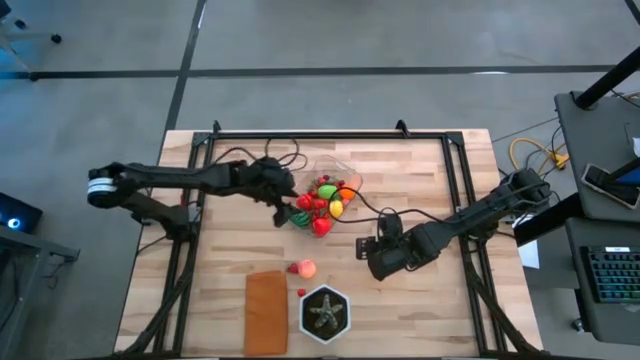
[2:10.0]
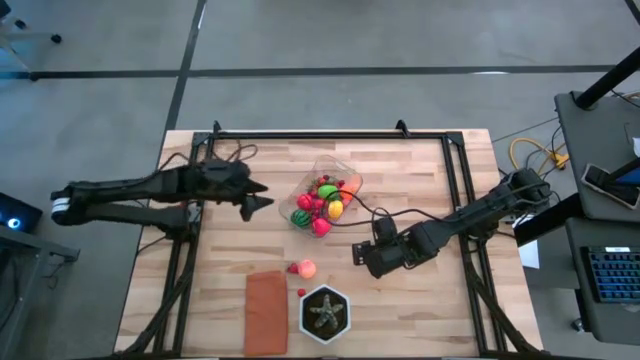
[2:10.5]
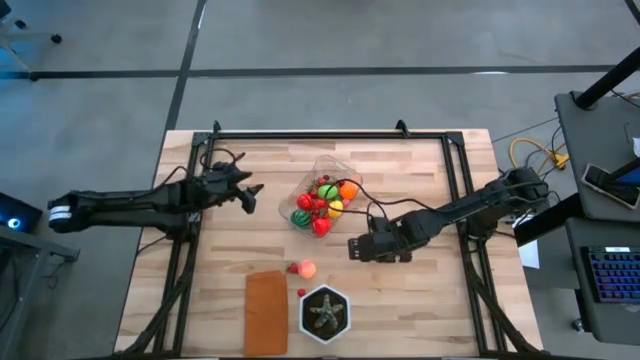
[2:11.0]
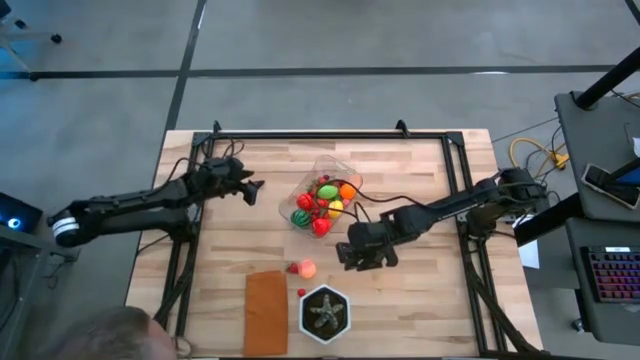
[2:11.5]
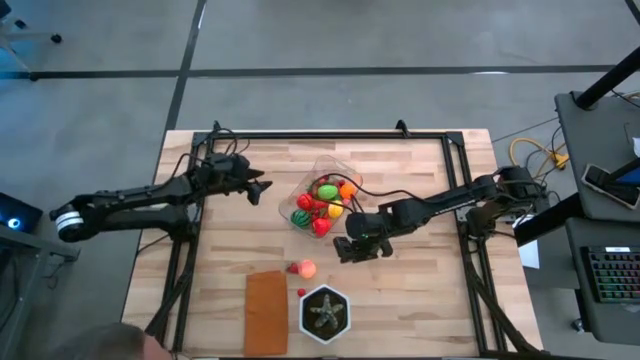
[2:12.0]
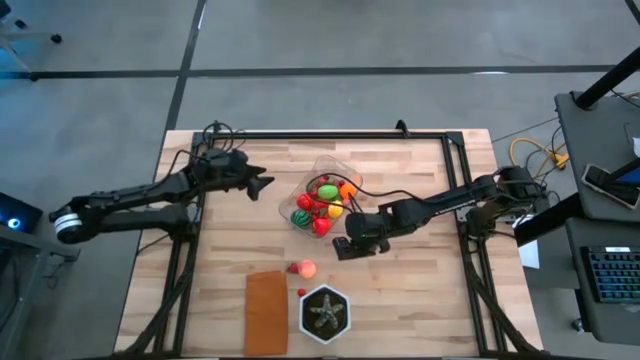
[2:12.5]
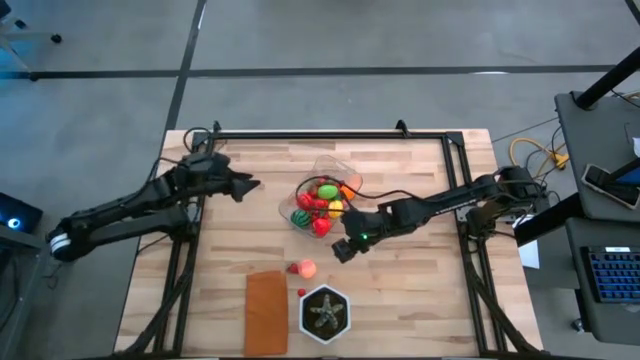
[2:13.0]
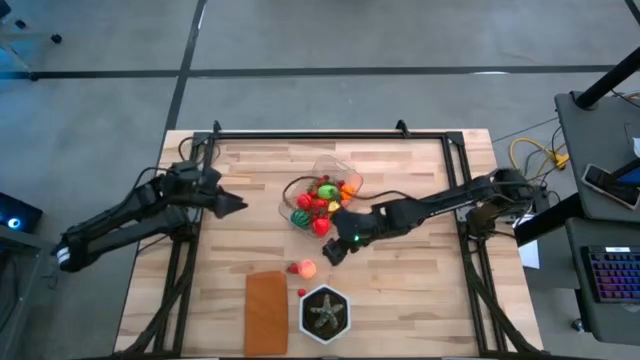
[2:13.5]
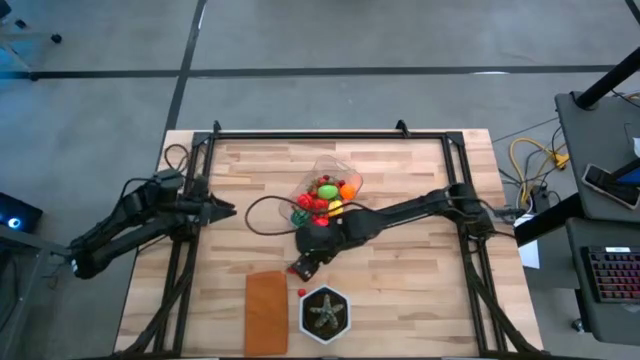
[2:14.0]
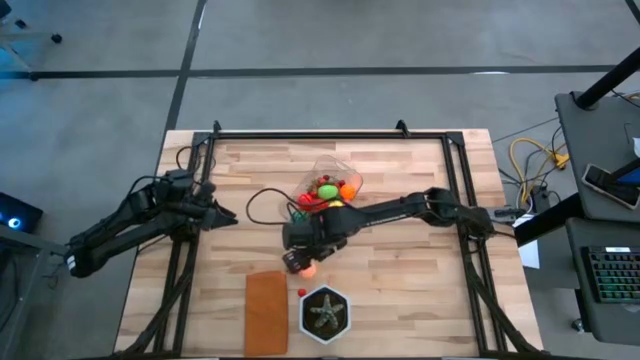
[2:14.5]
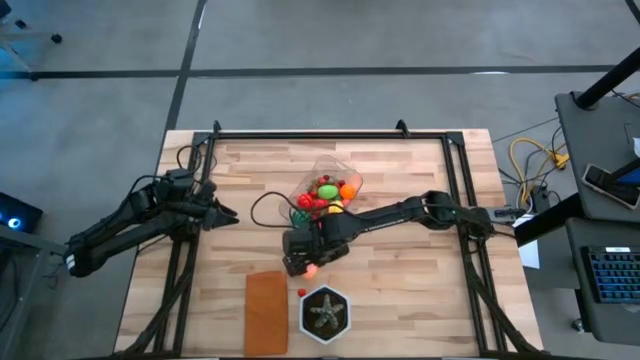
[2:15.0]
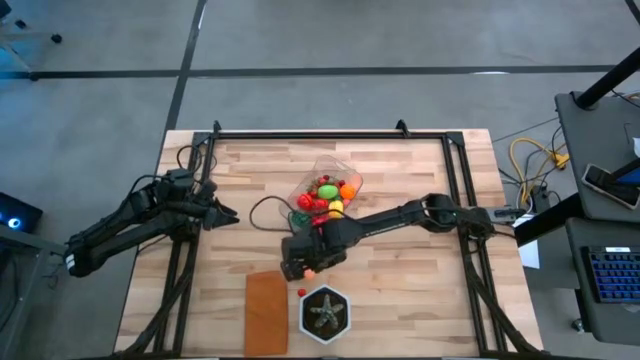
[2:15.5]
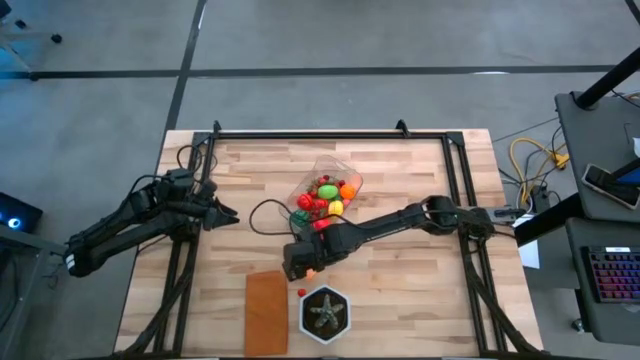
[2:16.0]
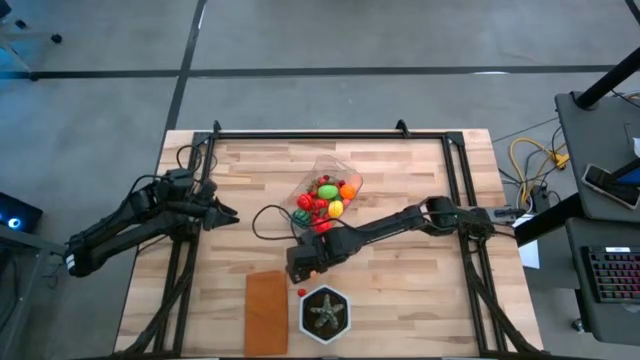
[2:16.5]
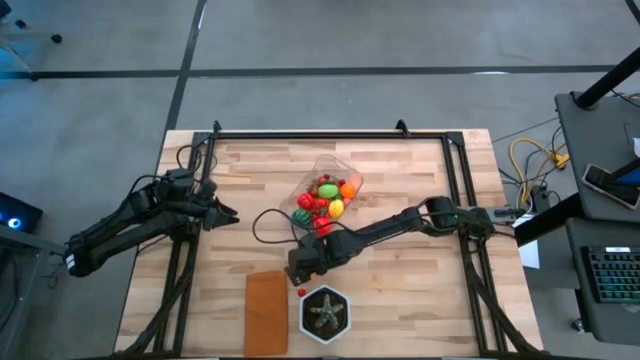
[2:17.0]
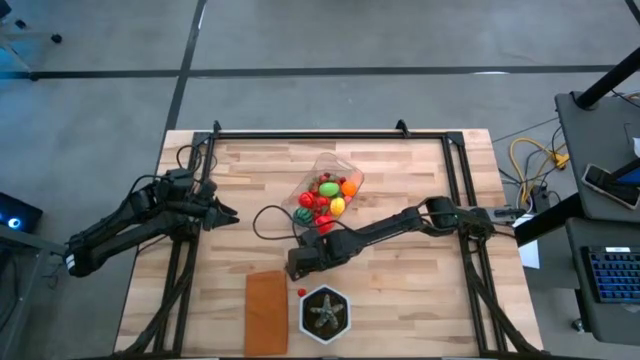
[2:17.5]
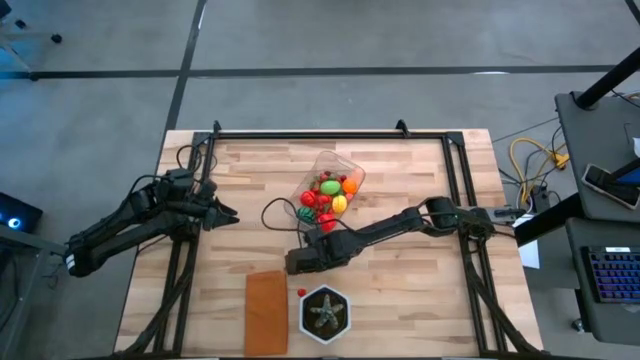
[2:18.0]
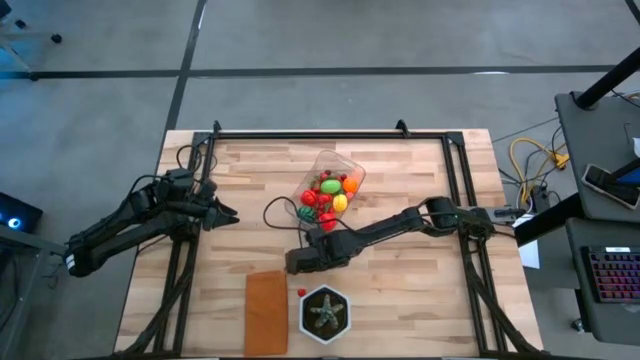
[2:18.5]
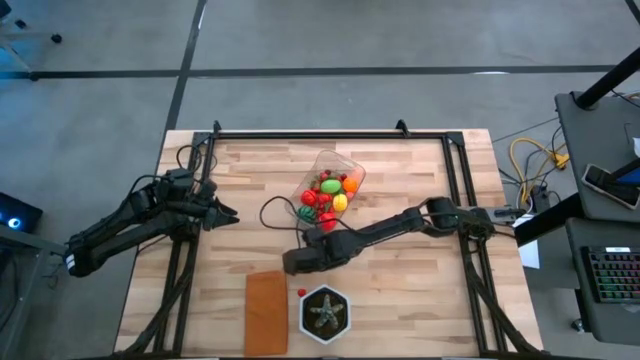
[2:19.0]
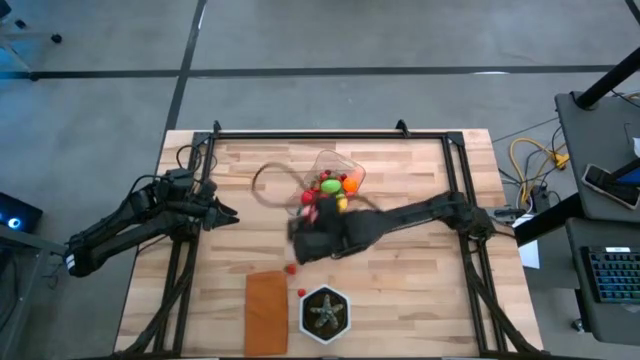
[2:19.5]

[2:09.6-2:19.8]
Task: Pick and placing Produce into tupperware
Put the pink peach into the transparent bin

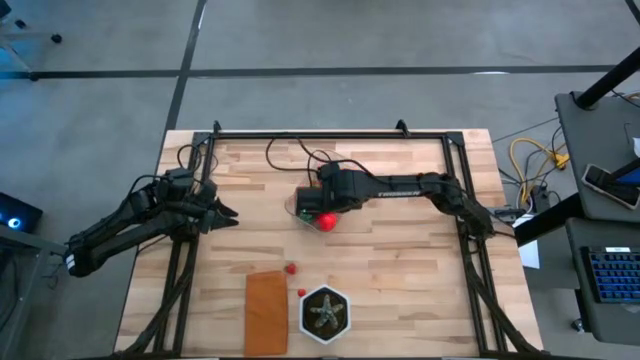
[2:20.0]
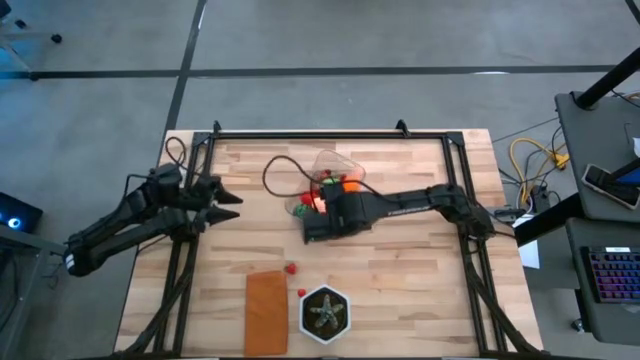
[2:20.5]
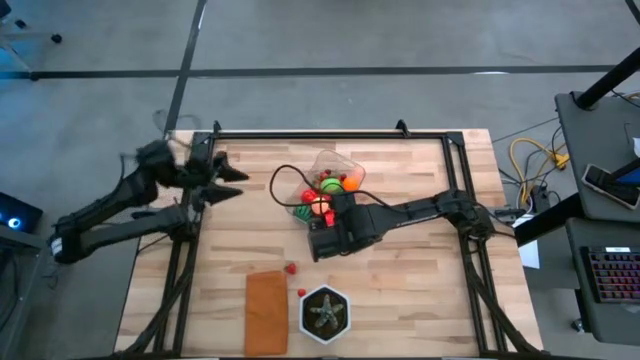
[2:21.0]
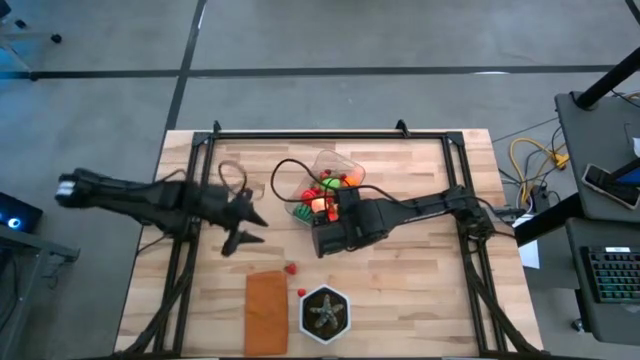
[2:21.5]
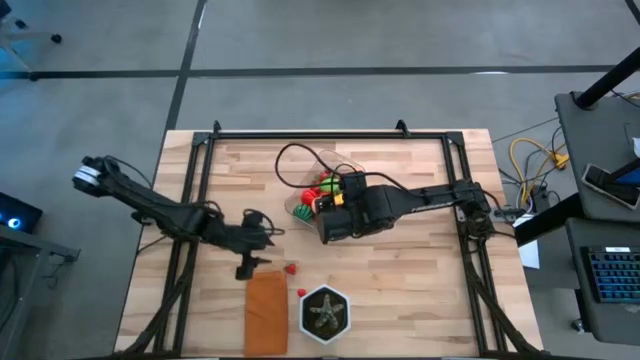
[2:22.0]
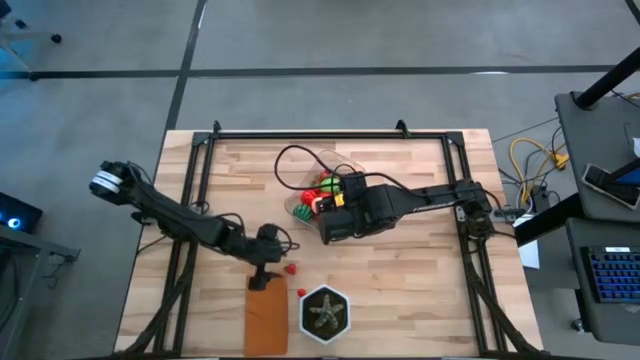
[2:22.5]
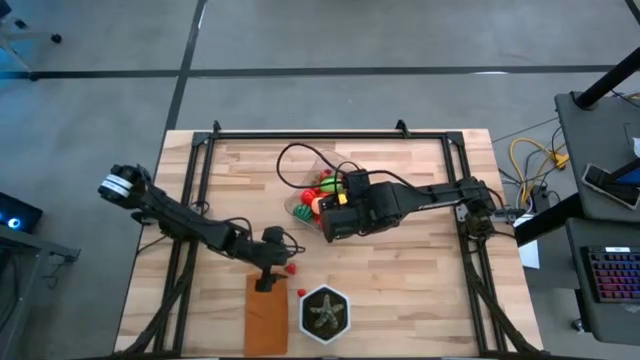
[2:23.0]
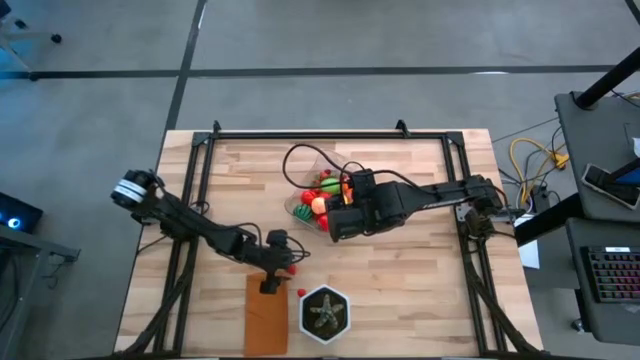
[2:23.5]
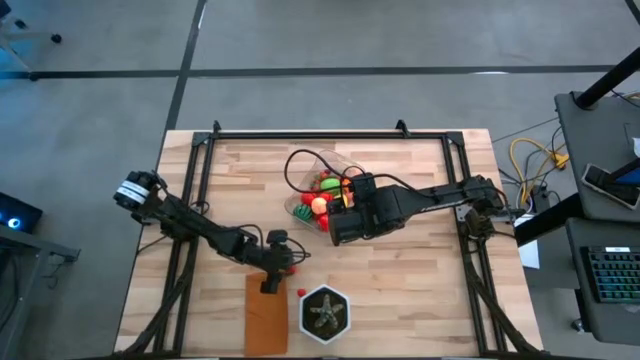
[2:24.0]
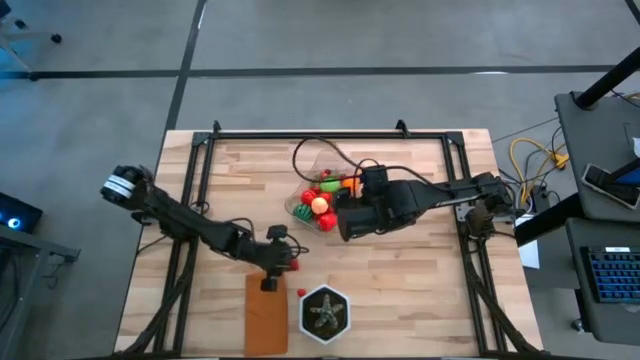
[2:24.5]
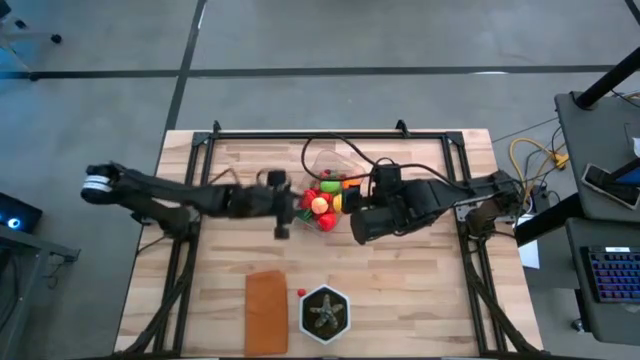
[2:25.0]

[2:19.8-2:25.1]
Put the red strawberry into the transparent bin

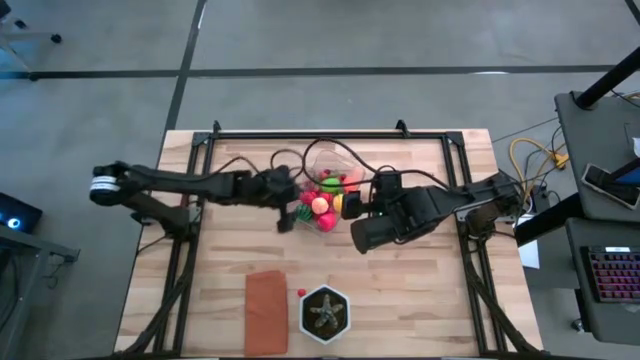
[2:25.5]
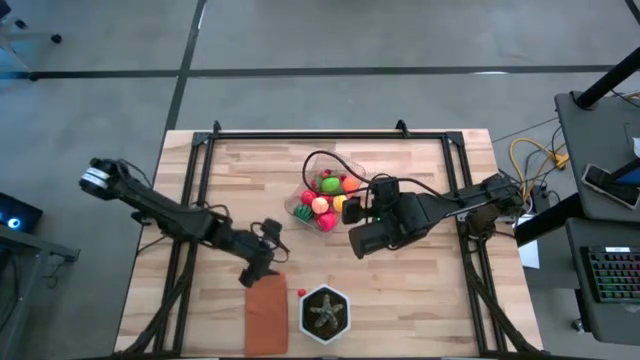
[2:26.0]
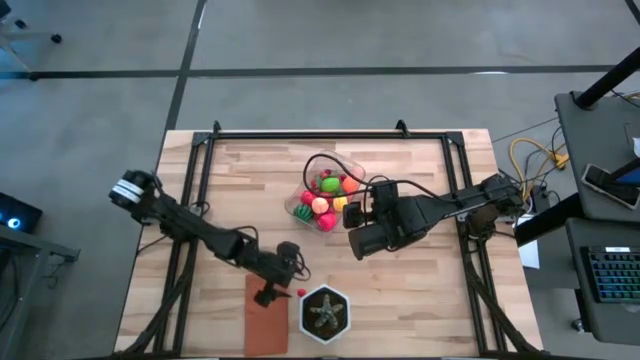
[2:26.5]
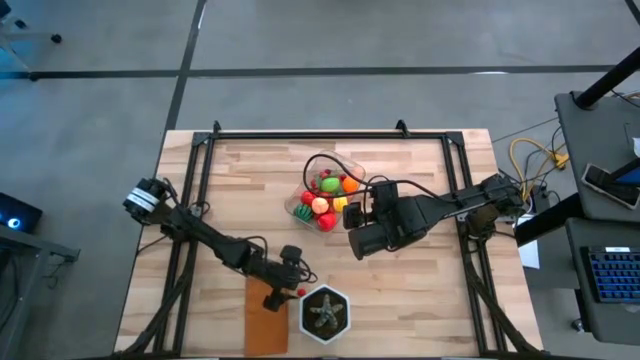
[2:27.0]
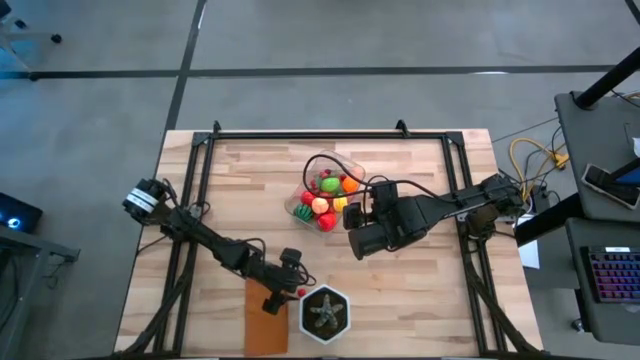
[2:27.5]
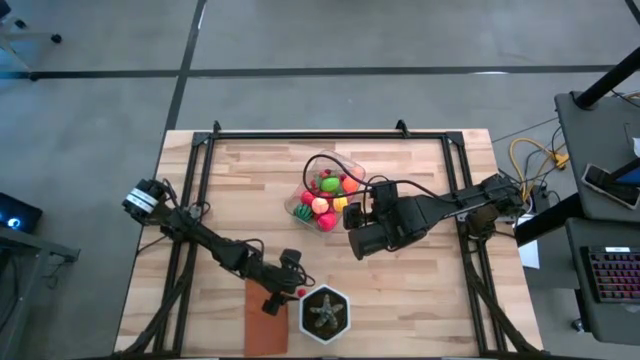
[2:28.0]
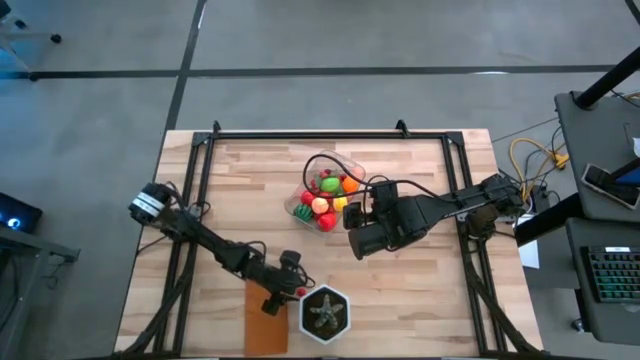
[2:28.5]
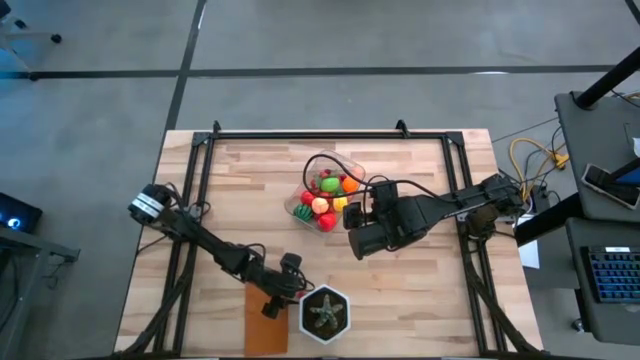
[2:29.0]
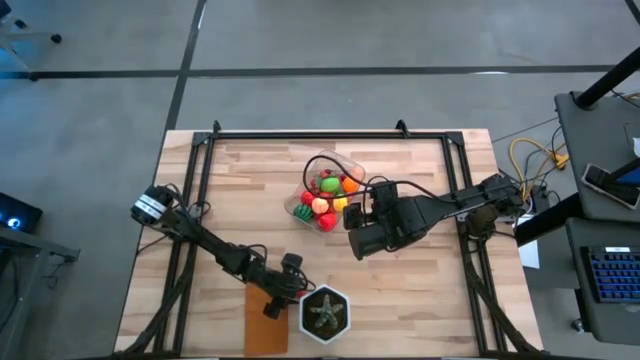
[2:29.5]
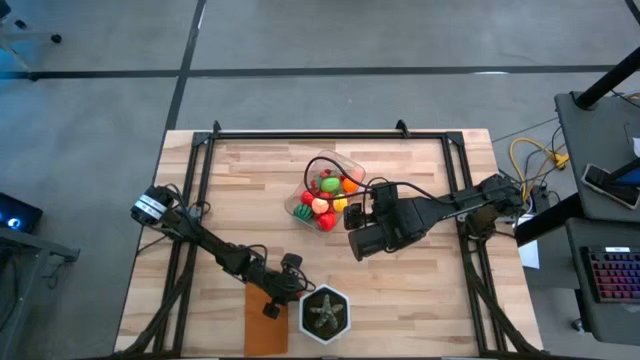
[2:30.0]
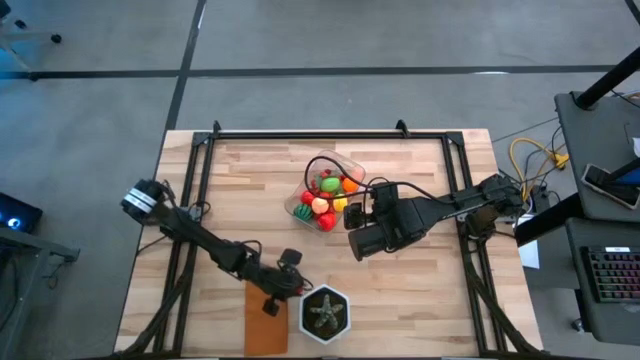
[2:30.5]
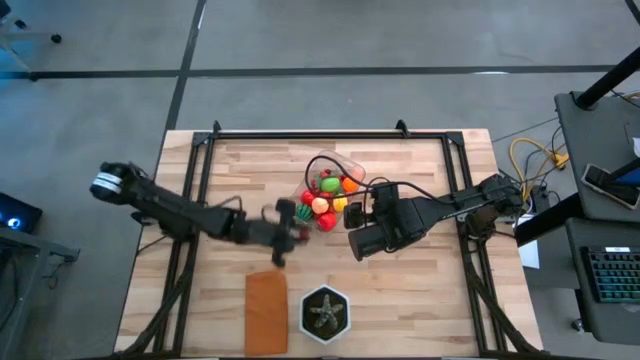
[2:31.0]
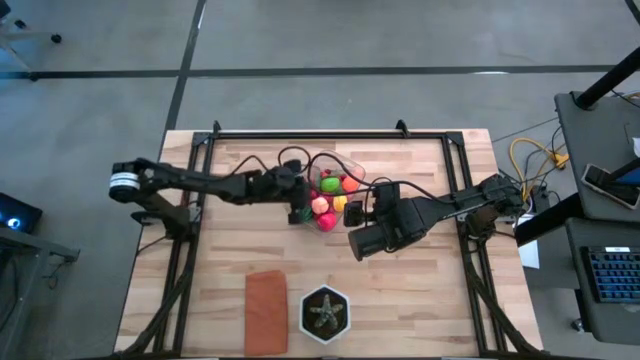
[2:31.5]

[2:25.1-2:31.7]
Put the red cherry into the transparent bin
